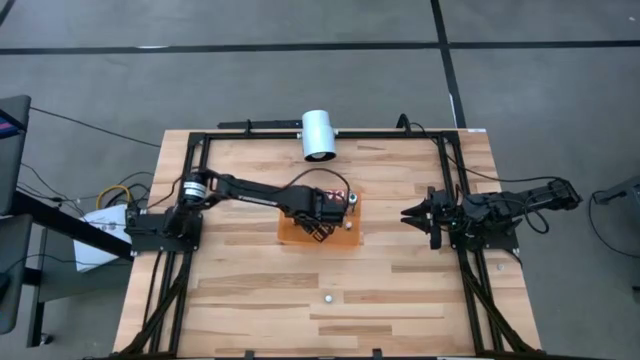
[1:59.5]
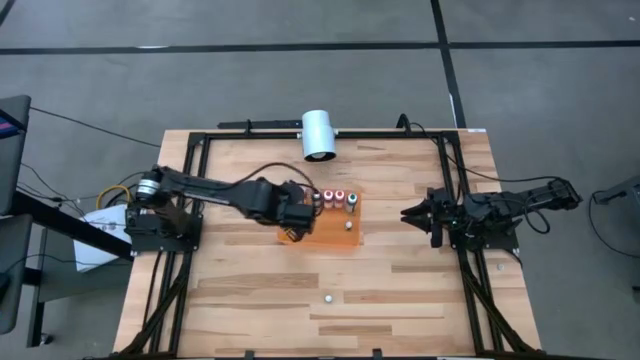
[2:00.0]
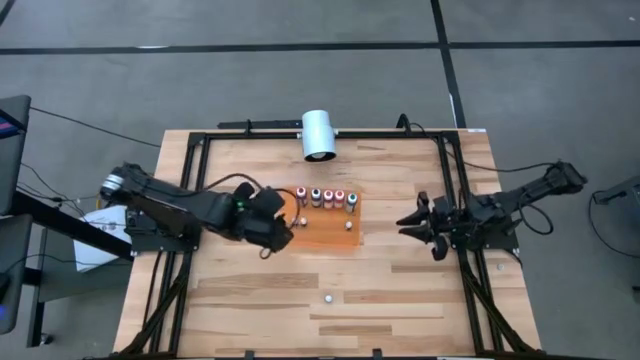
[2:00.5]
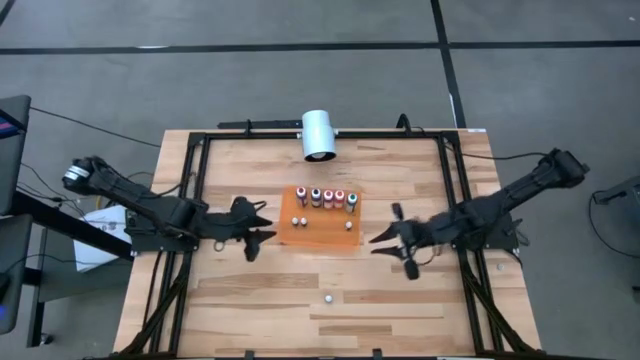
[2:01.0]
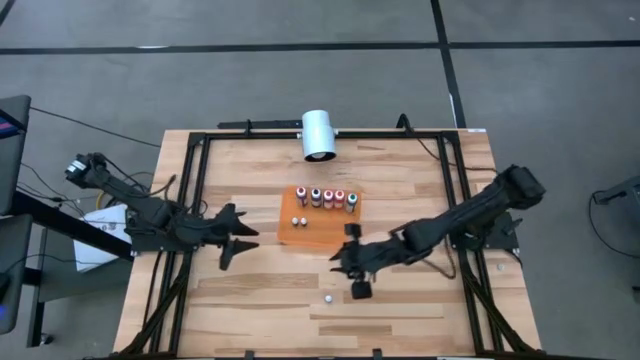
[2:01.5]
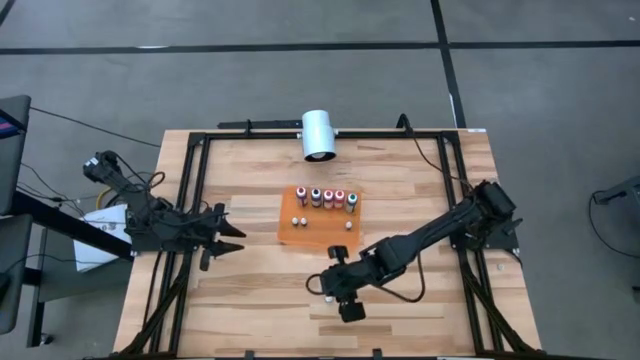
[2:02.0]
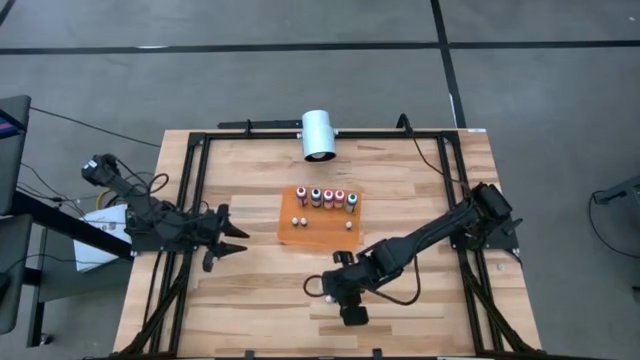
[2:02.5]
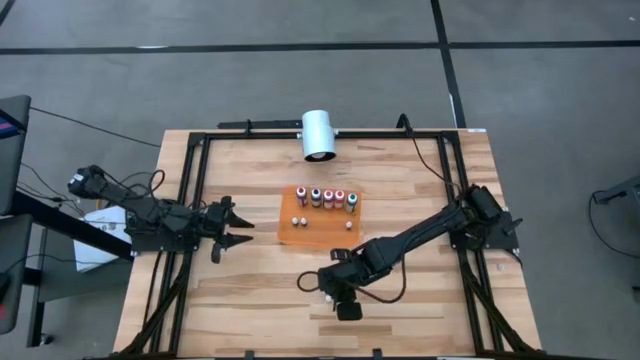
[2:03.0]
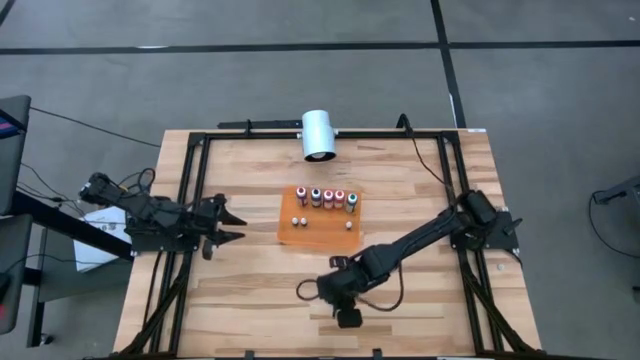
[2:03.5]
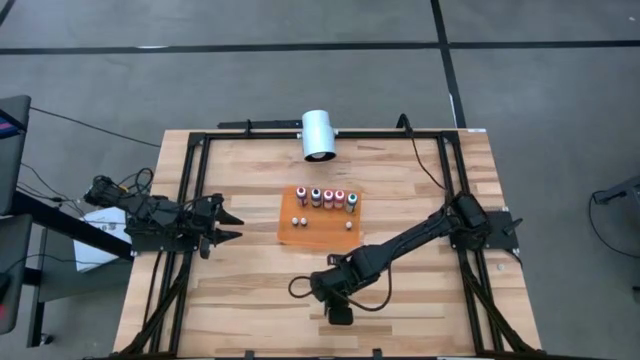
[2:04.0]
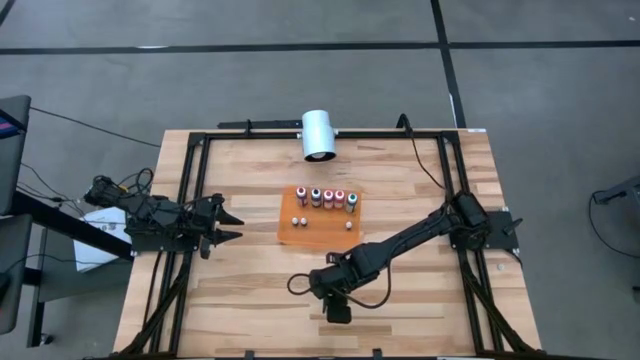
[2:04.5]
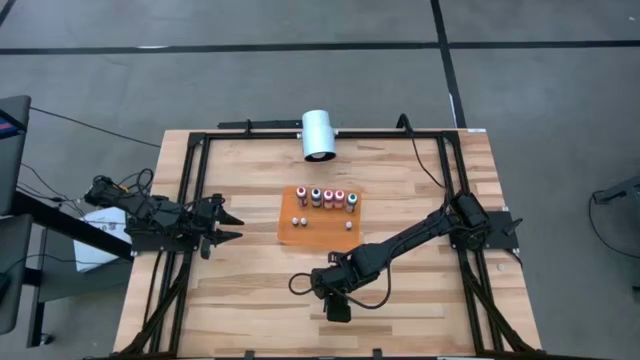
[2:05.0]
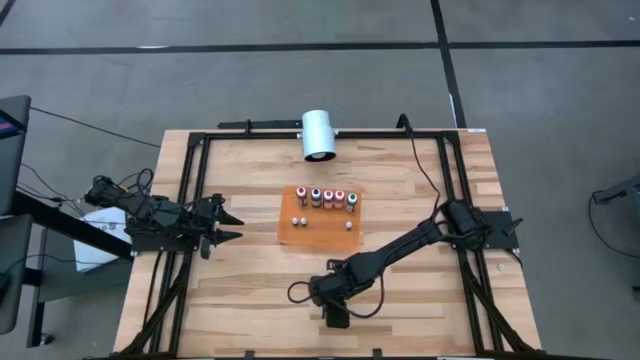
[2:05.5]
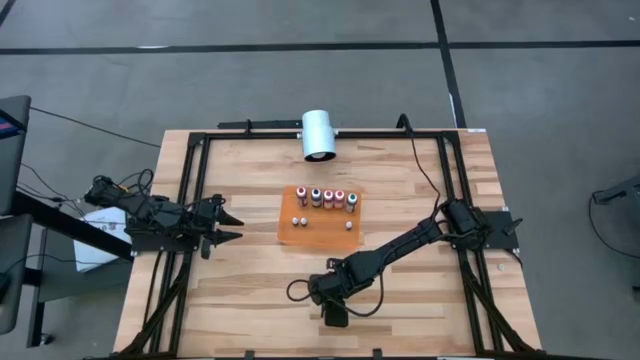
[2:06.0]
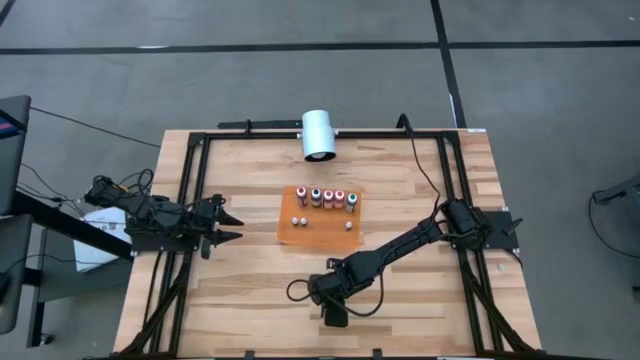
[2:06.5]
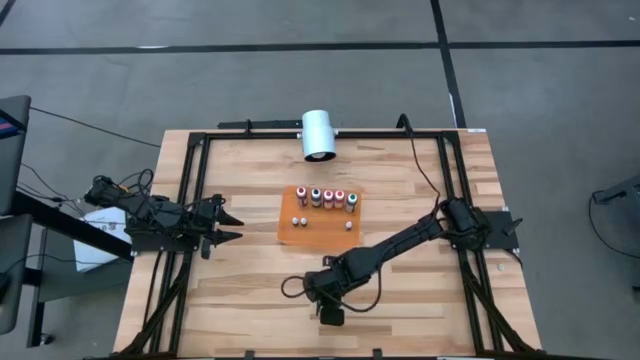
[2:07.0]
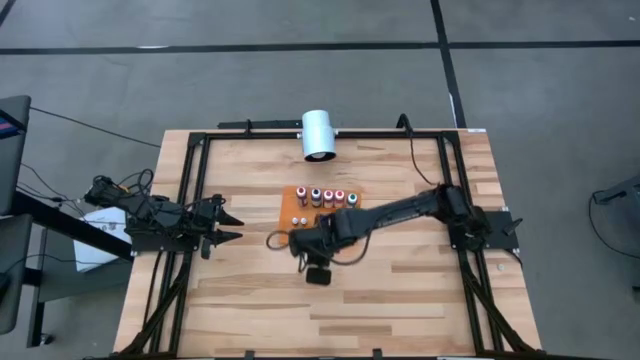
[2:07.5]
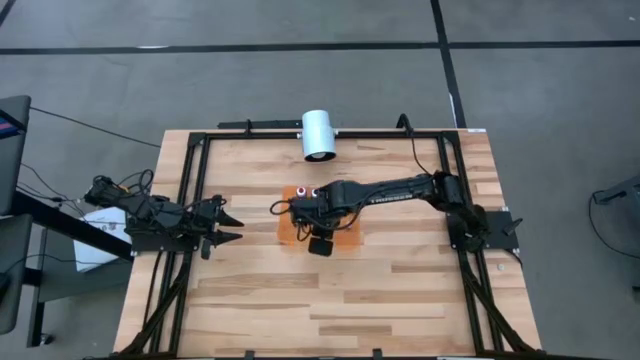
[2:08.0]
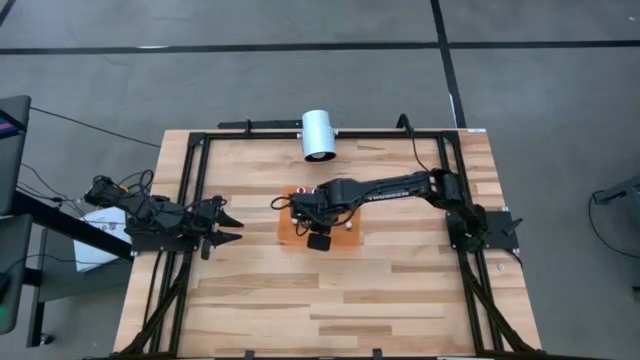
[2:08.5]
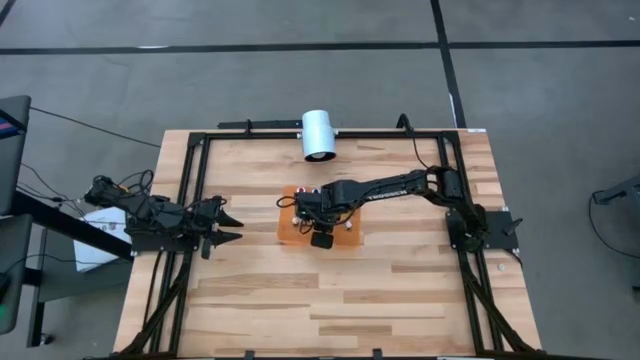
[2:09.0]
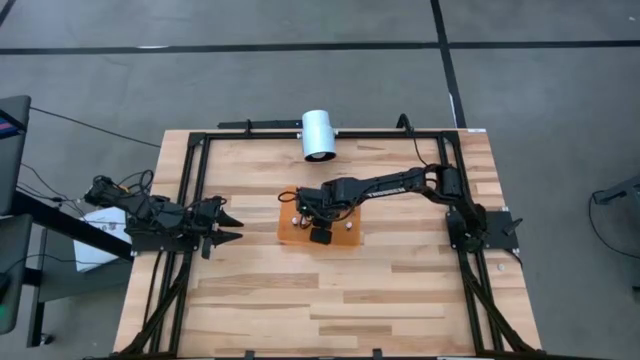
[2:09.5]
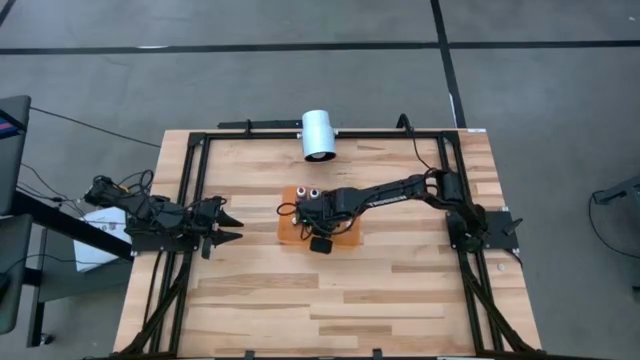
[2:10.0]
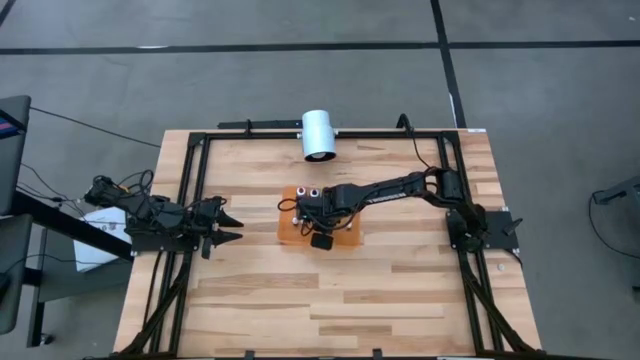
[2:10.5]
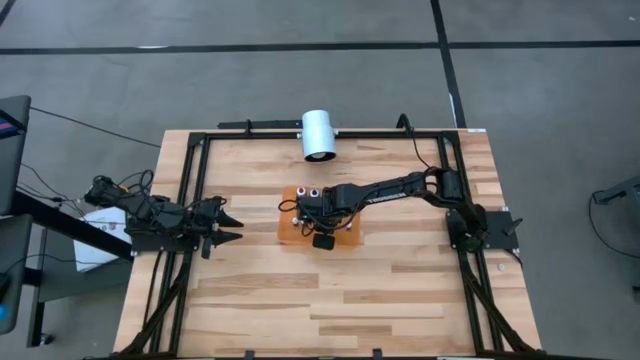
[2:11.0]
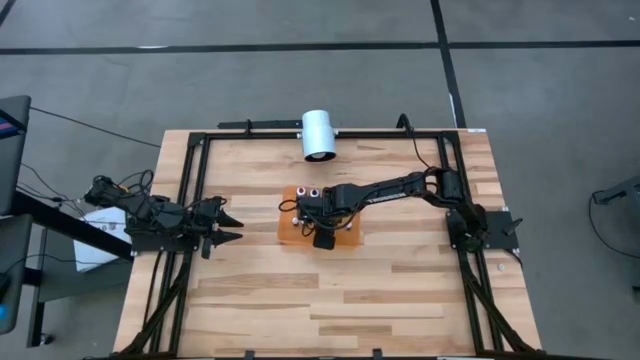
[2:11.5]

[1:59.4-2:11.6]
Task: Pick & Place food coloring
Put the small brown food coloring bottle into the orange bin

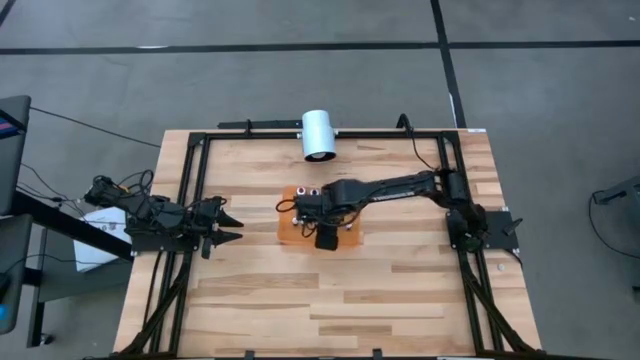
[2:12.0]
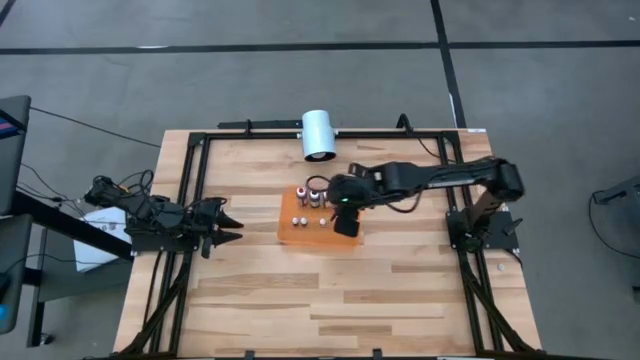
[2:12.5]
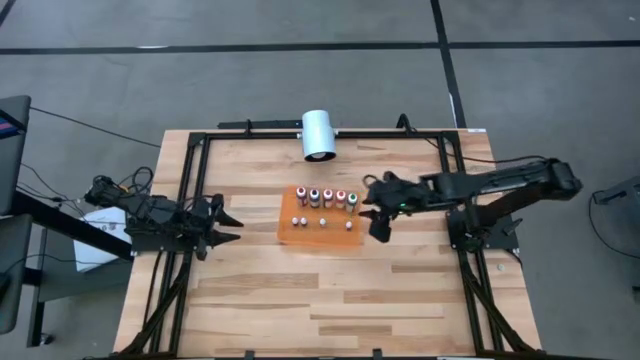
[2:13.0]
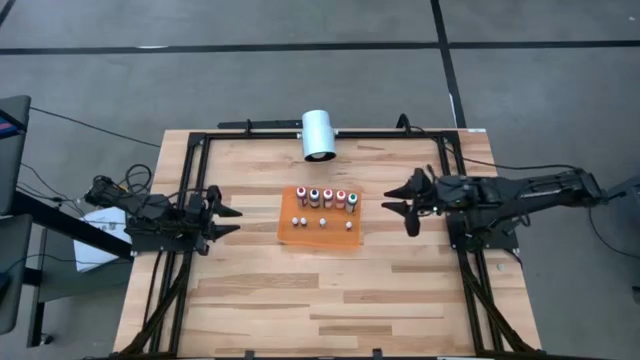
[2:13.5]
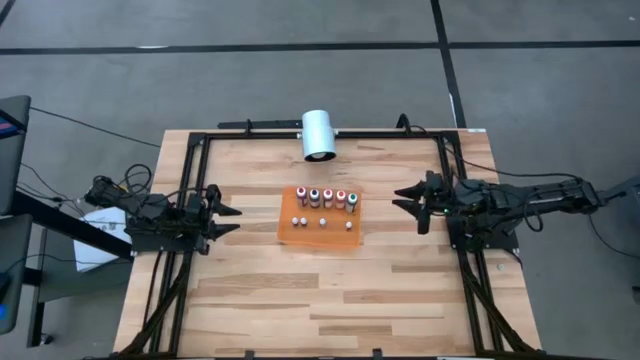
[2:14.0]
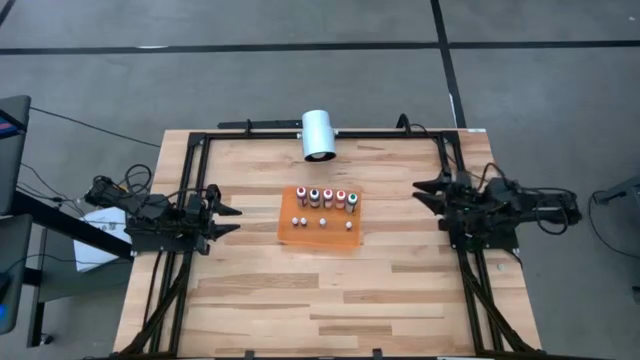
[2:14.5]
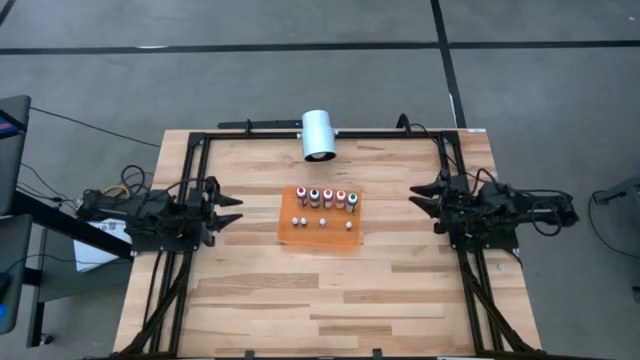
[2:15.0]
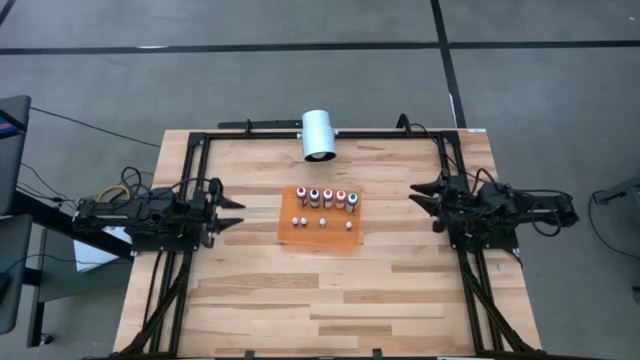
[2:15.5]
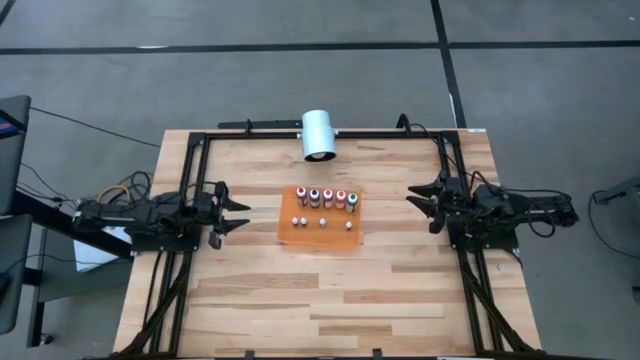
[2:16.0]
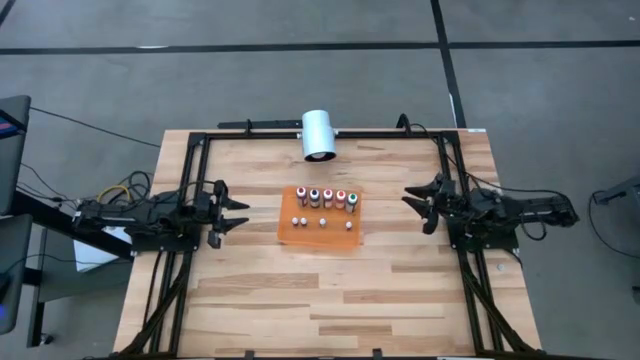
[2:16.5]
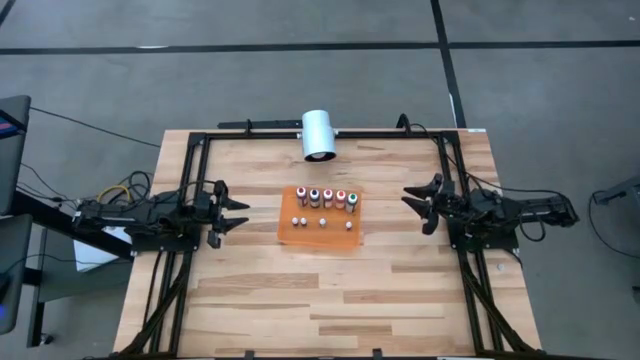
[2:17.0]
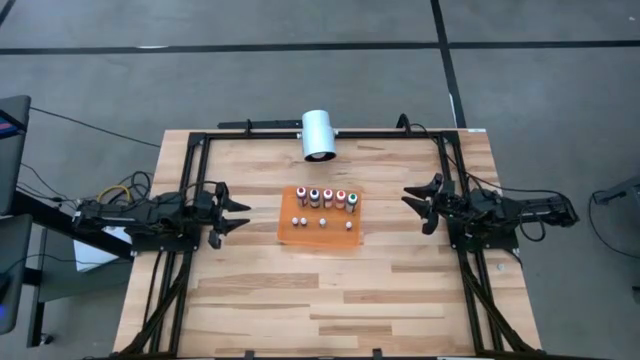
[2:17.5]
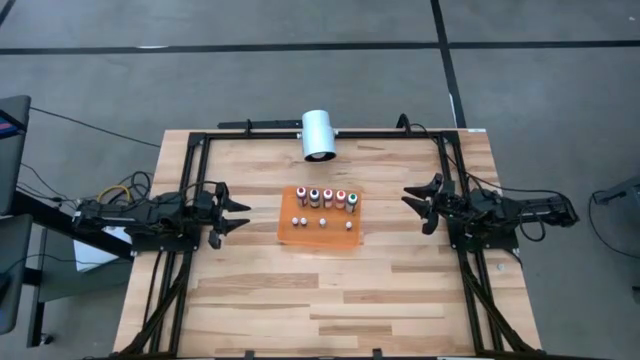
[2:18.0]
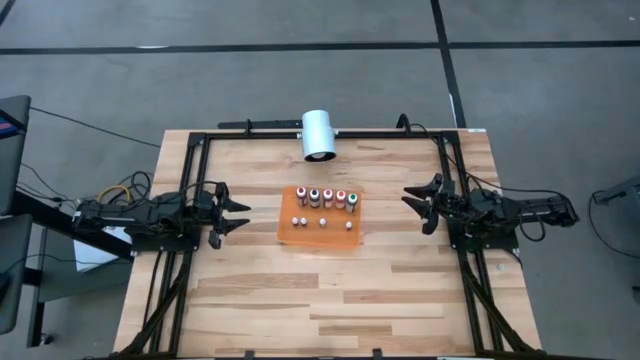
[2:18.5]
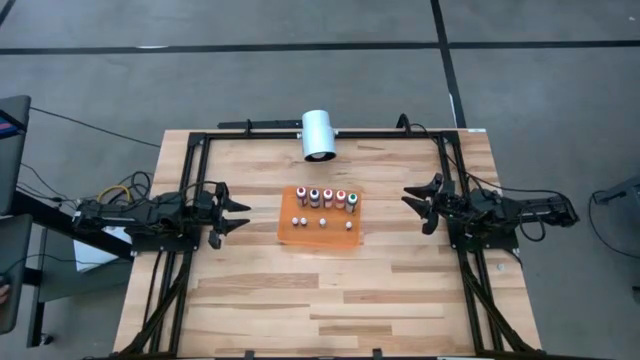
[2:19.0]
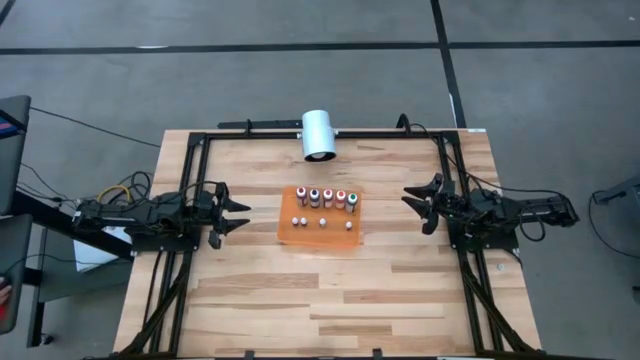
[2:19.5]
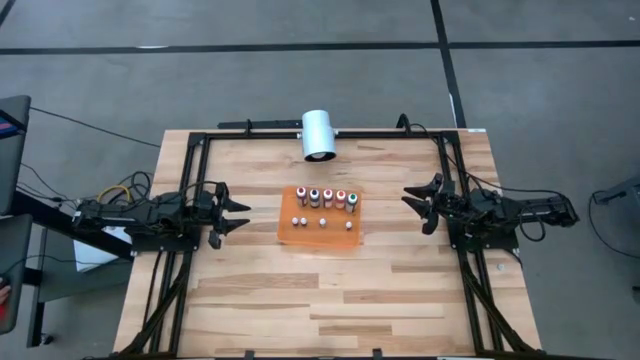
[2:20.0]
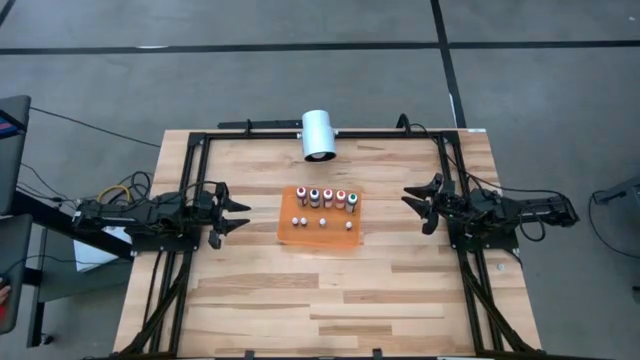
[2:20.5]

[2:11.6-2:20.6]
Return to Home Position
